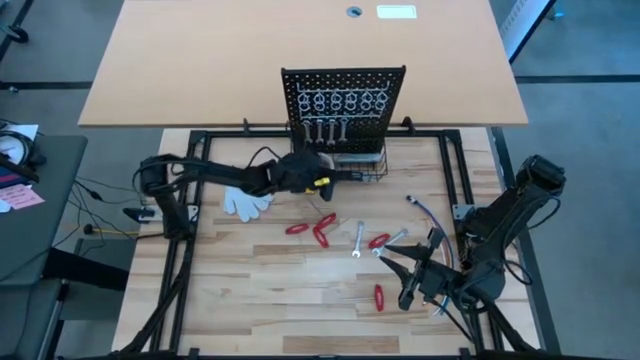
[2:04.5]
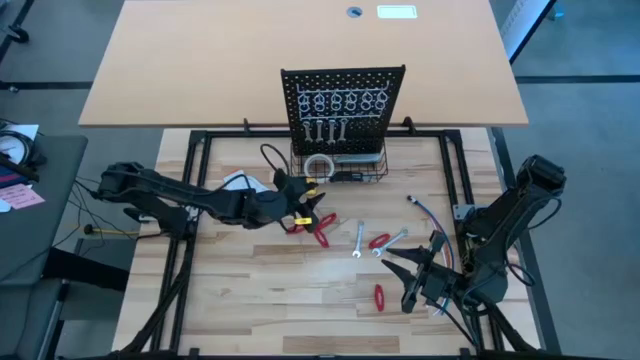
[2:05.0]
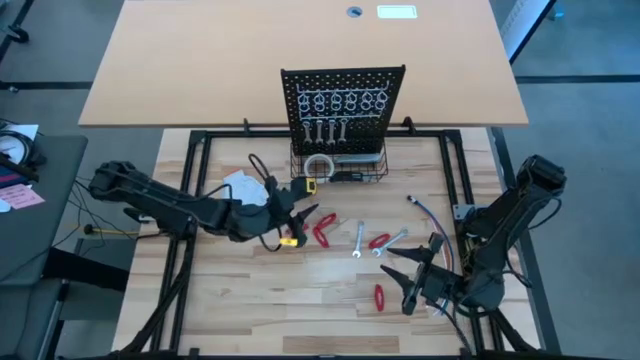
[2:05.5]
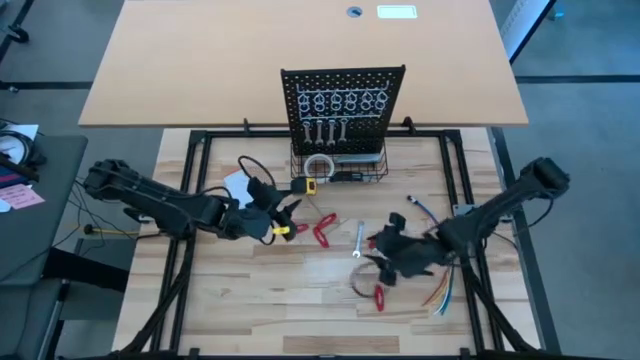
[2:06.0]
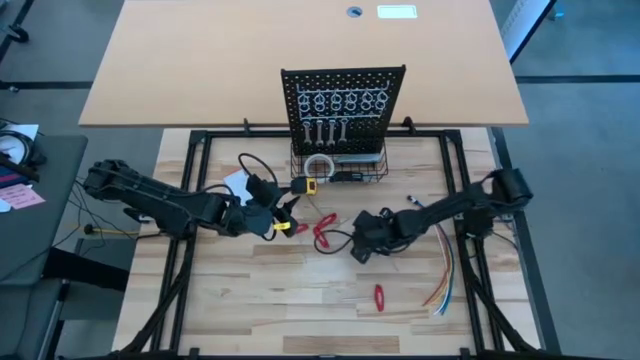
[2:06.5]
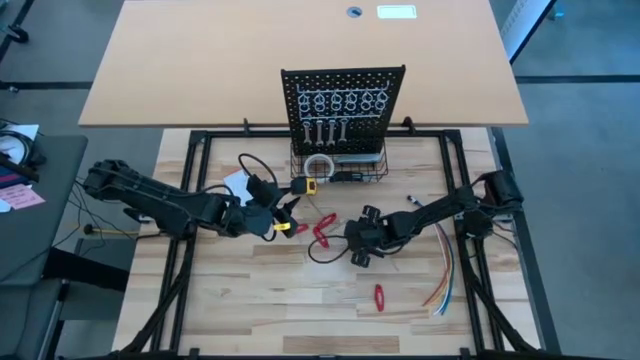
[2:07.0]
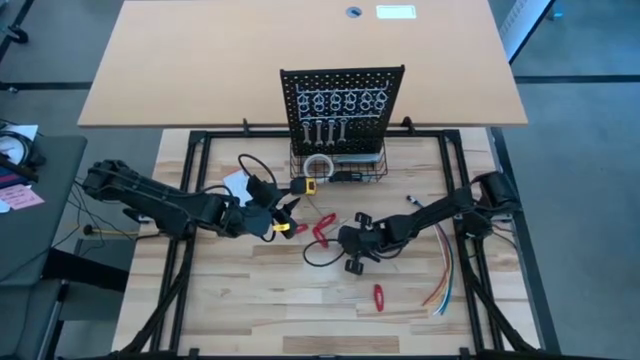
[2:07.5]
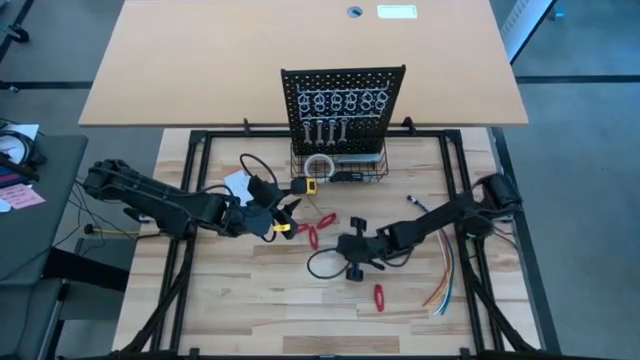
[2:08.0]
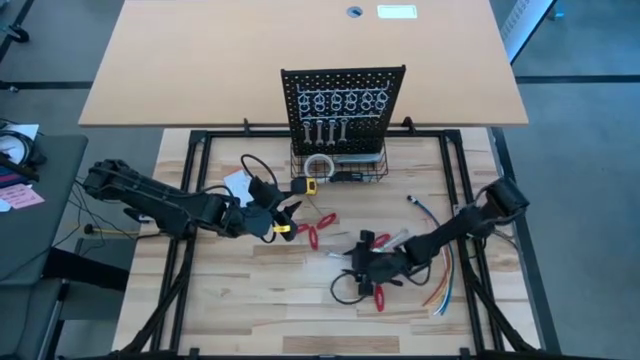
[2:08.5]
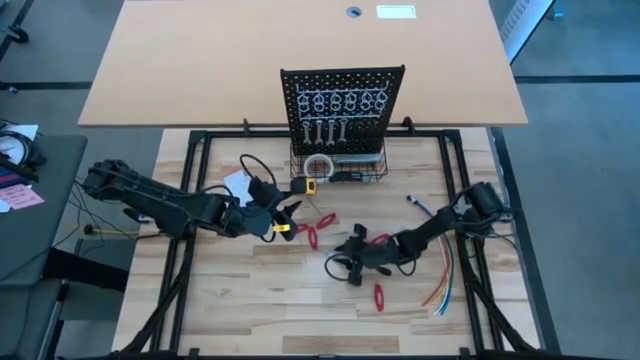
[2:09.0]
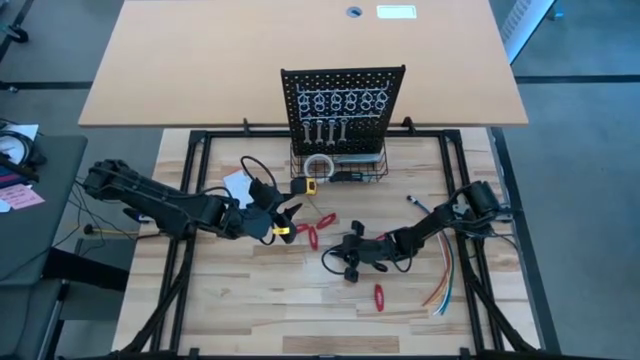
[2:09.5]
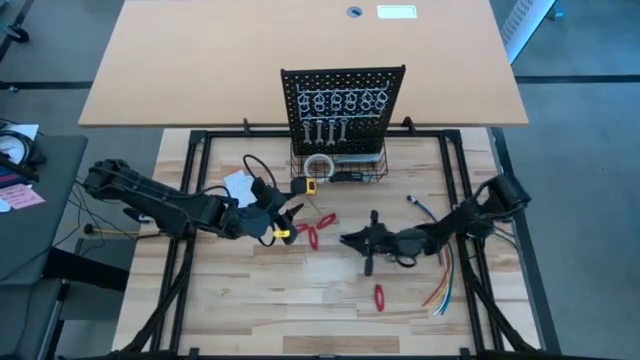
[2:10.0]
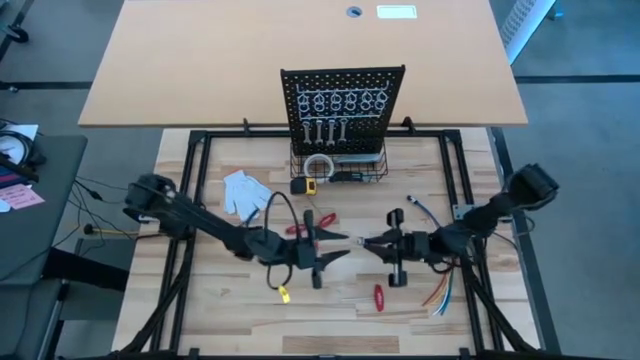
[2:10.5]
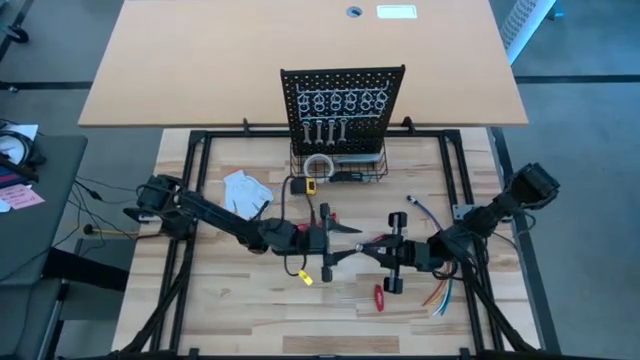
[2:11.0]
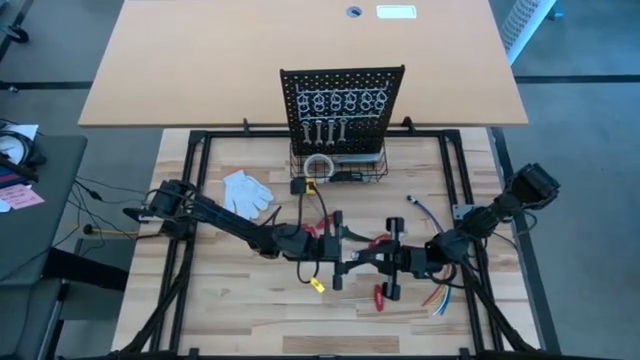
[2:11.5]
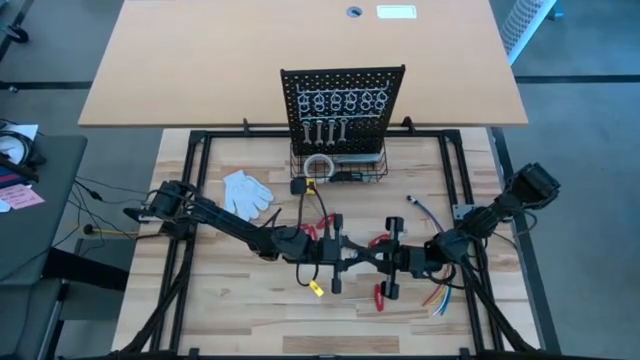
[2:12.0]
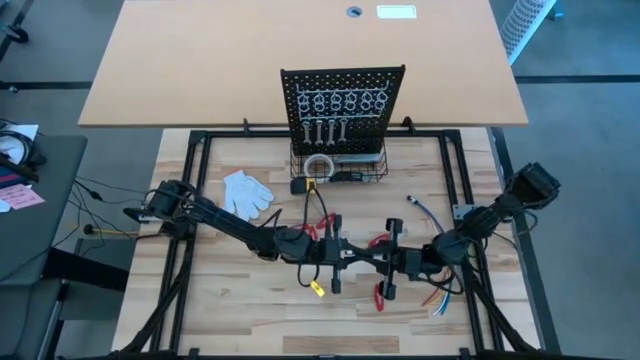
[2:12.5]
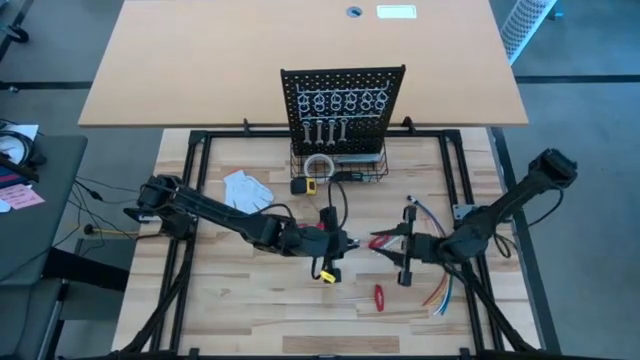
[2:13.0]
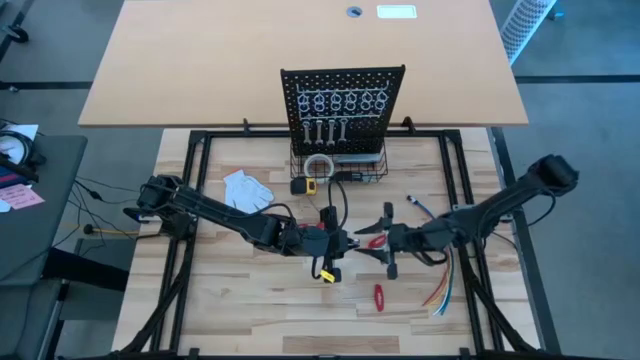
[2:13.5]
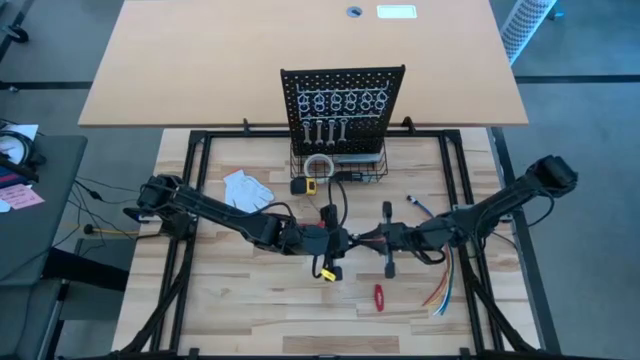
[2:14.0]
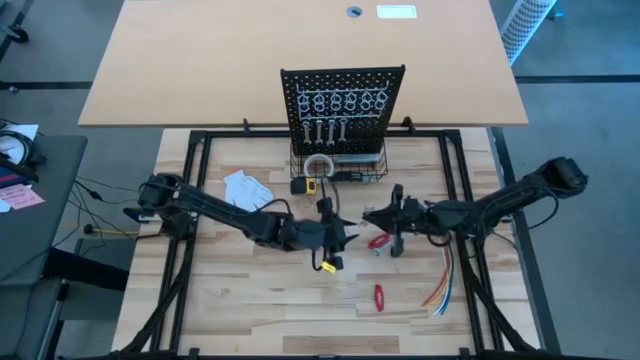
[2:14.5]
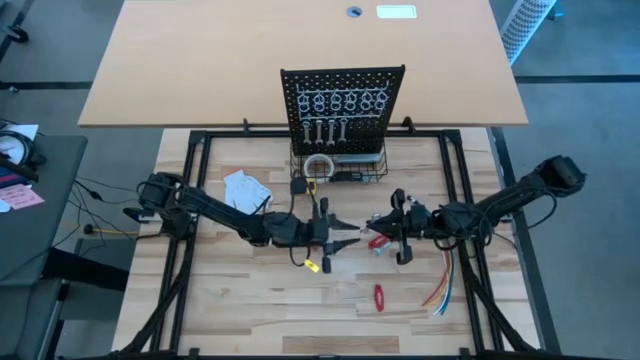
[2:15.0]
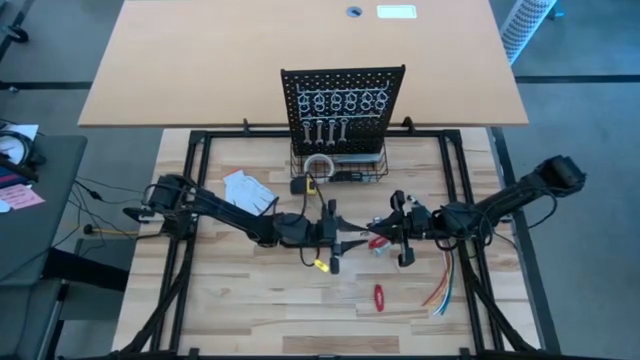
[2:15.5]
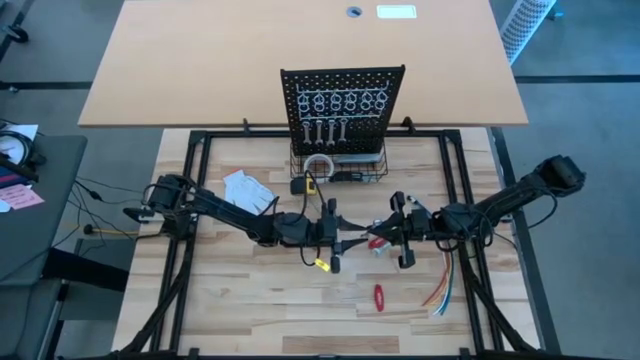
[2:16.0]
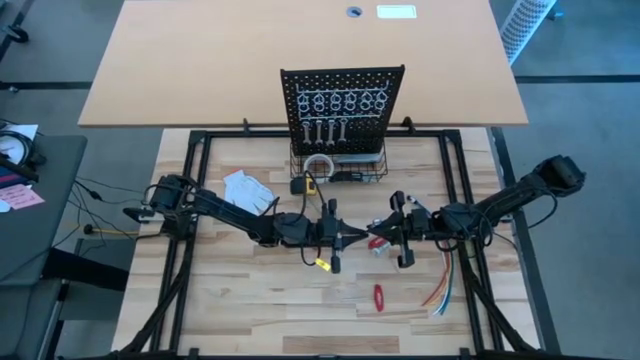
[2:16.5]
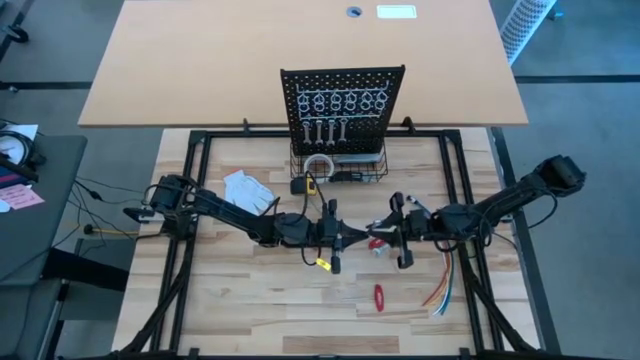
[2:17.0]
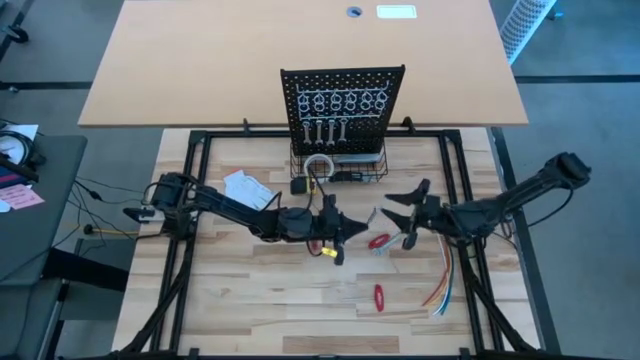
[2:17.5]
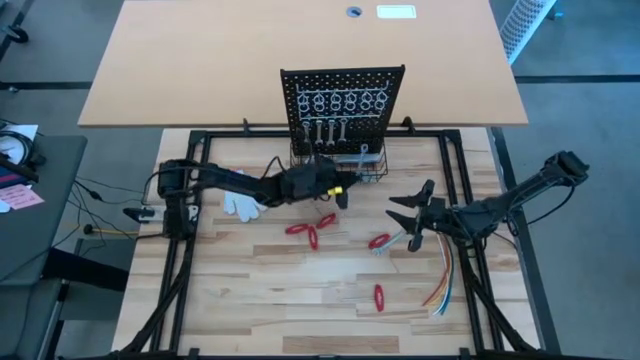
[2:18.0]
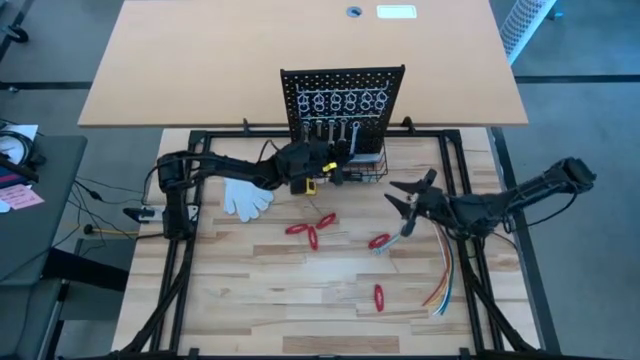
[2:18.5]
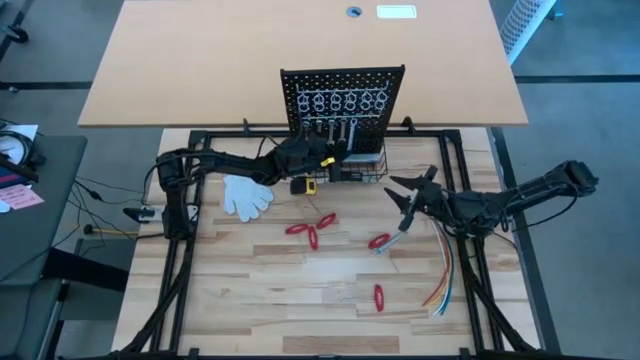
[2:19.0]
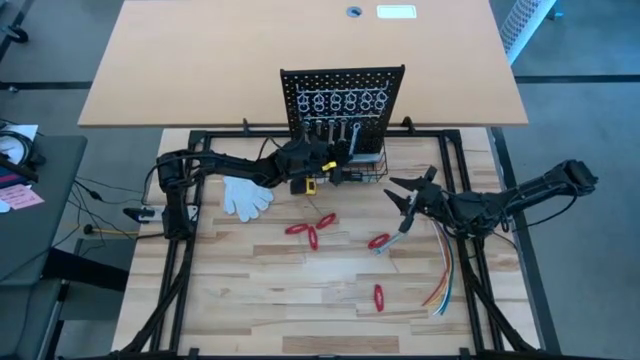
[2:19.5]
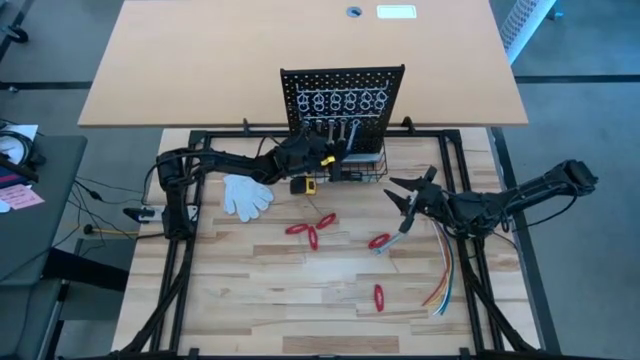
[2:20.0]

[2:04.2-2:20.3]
Task: Hang tools onto peg board
Hang the silver wrench on the peg board

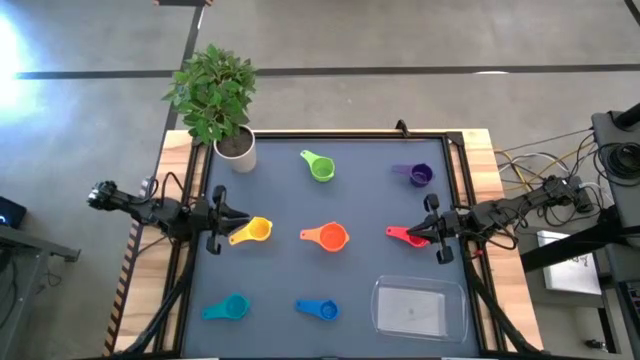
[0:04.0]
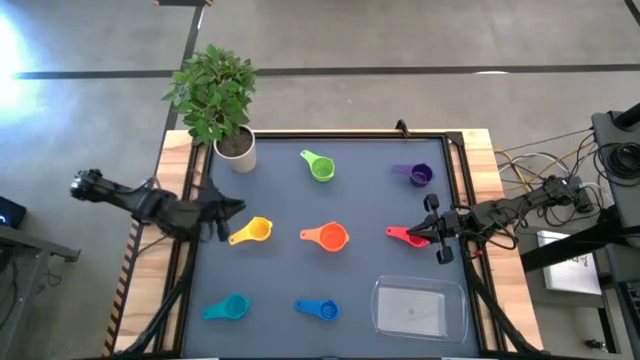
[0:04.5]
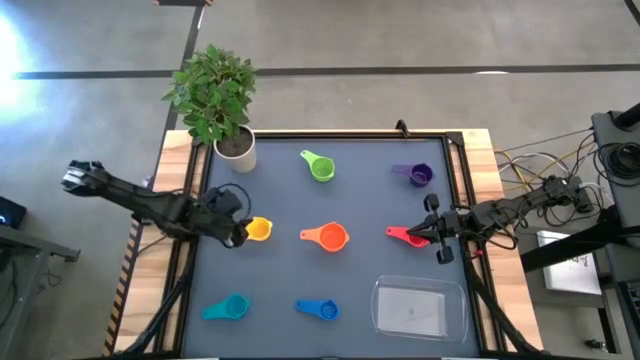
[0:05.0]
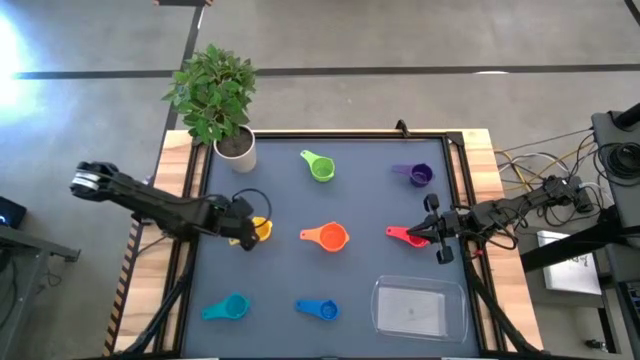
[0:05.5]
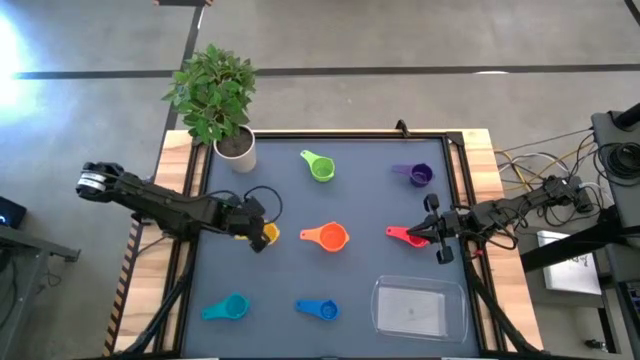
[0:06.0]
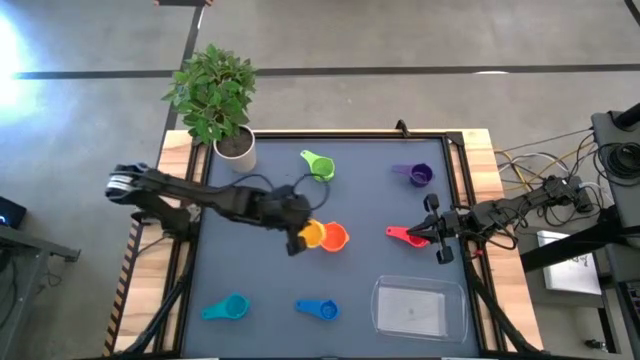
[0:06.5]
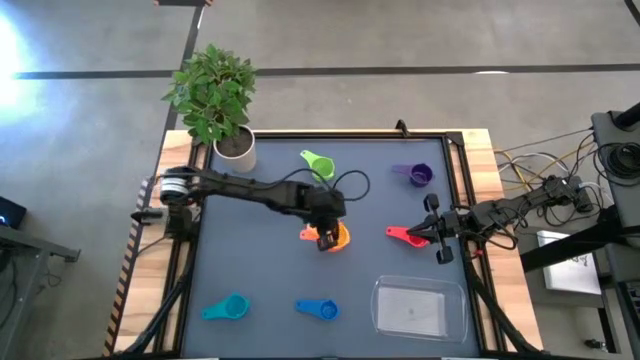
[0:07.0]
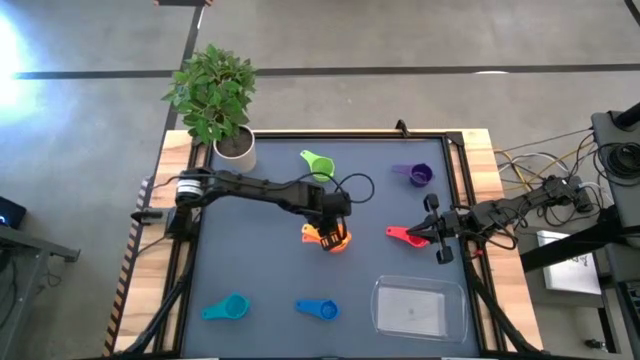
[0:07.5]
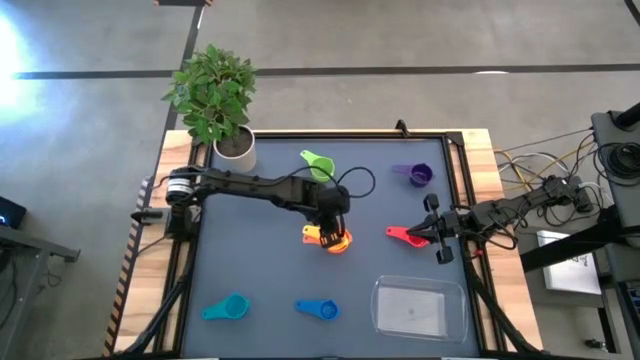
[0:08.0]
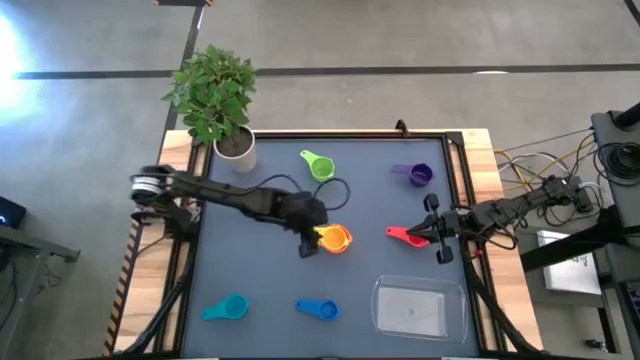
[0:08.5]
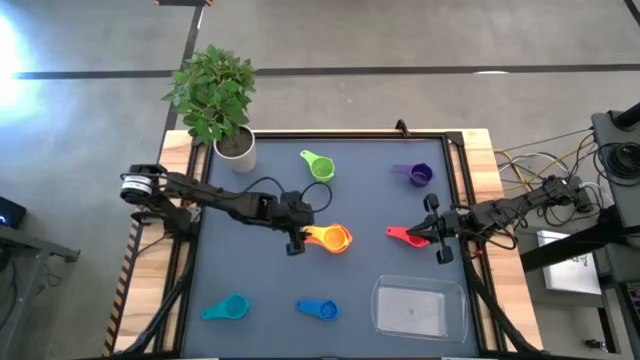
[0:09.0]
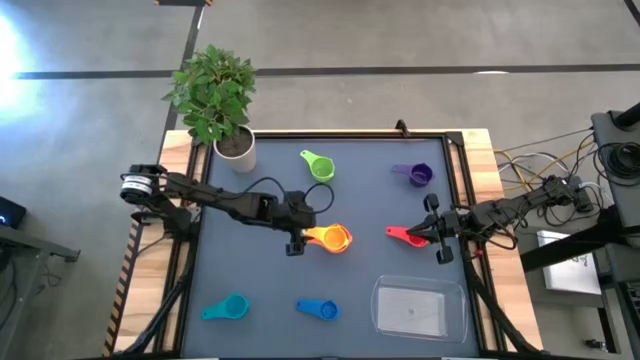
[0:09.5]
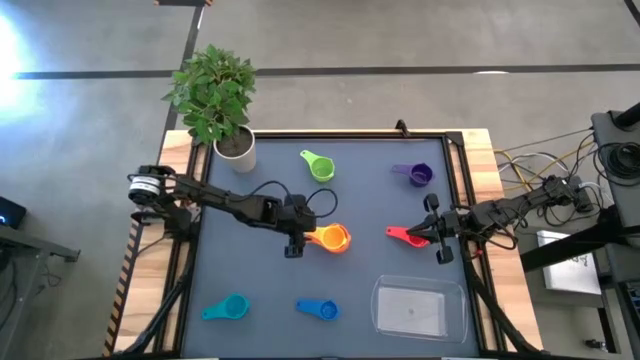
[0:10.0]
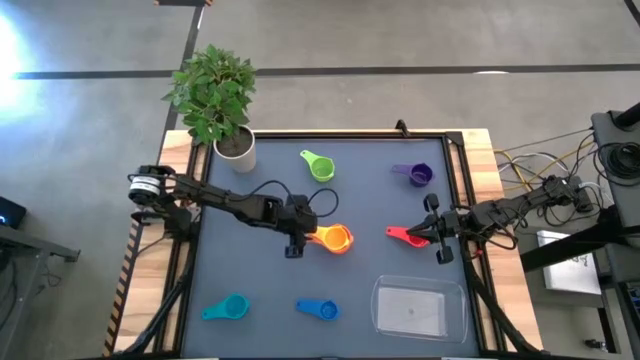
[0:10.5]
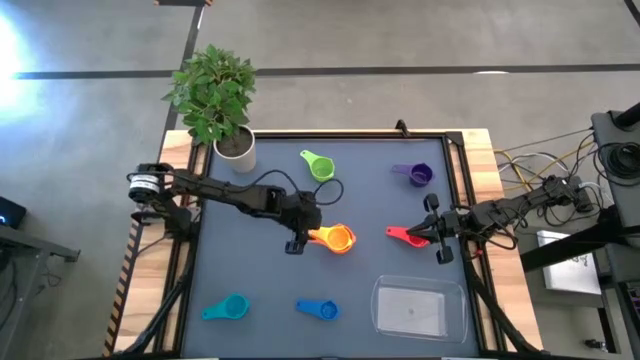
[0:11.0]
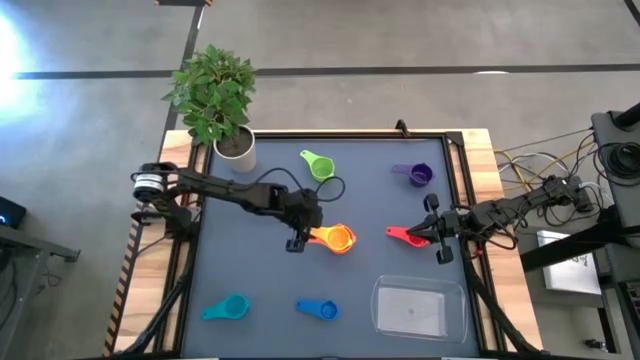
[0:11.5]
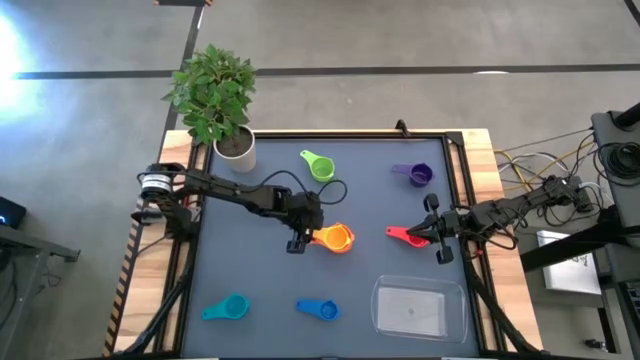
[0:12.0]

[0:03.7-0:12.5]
Task: Nest measuring cups in basket
Stack the yellow measuring cup on top of the orange measuring cup
